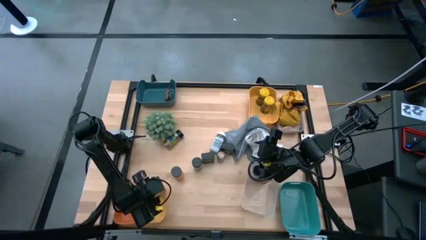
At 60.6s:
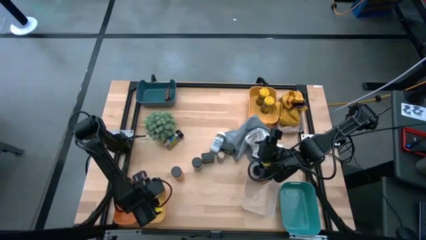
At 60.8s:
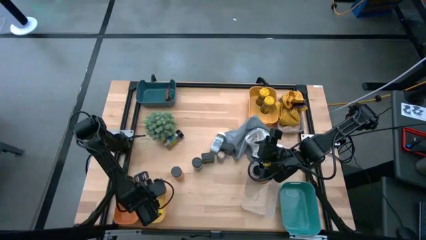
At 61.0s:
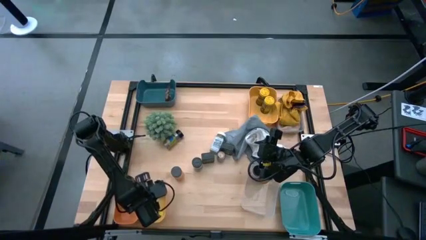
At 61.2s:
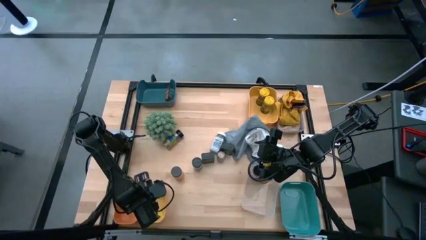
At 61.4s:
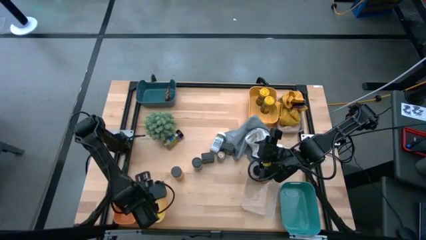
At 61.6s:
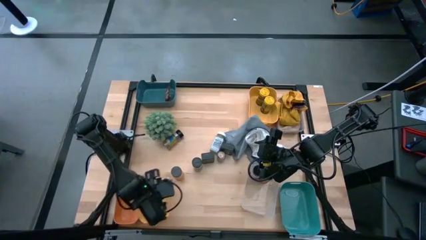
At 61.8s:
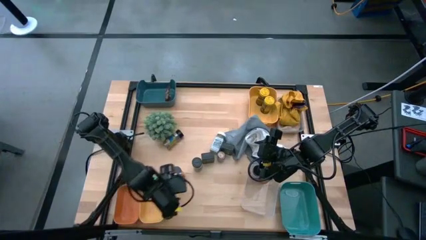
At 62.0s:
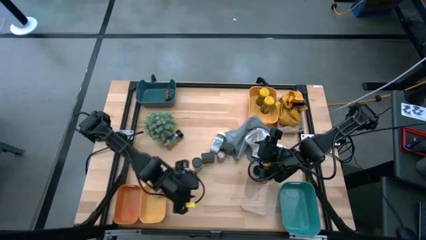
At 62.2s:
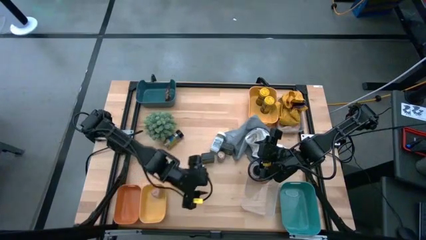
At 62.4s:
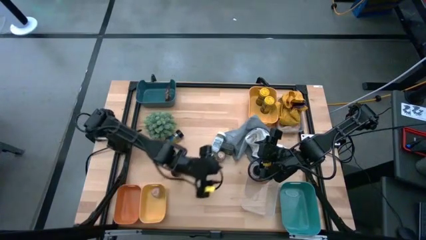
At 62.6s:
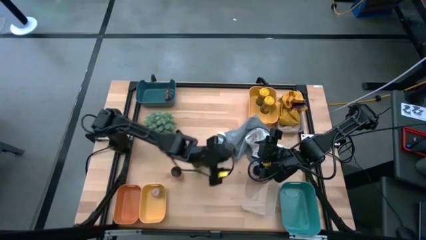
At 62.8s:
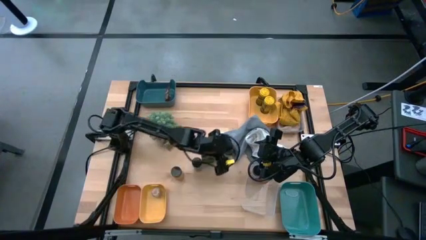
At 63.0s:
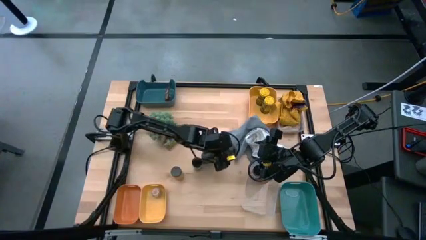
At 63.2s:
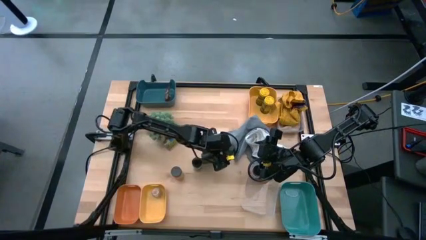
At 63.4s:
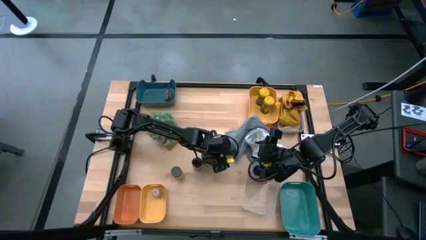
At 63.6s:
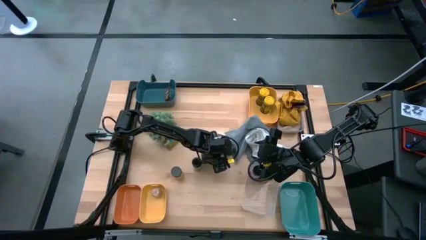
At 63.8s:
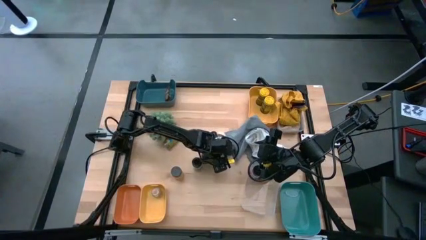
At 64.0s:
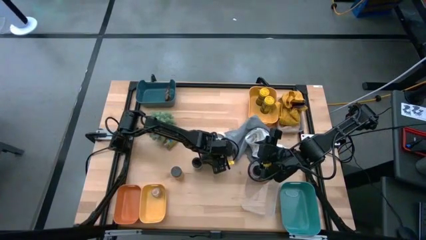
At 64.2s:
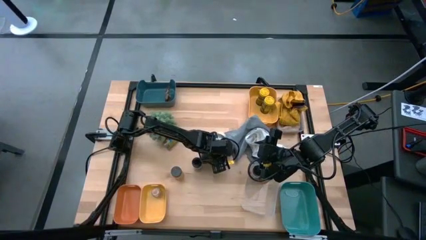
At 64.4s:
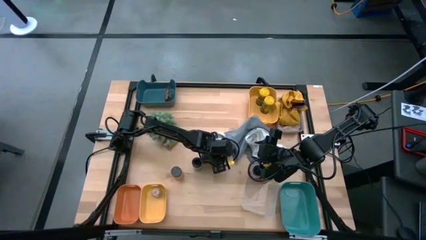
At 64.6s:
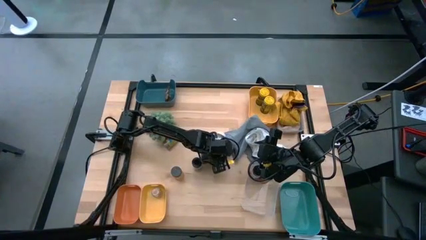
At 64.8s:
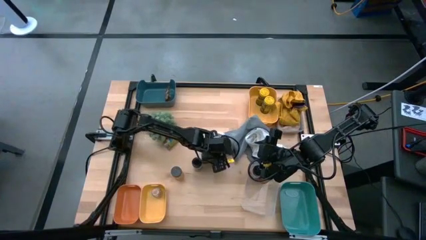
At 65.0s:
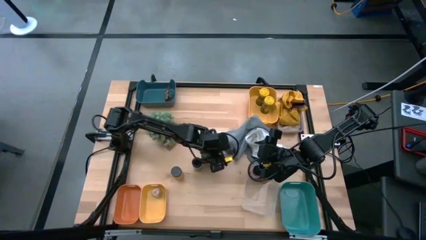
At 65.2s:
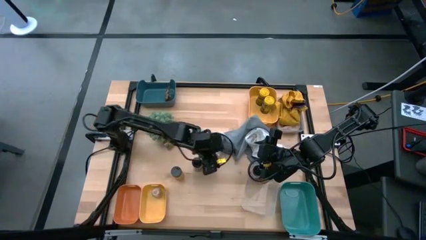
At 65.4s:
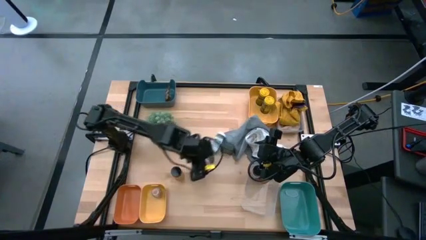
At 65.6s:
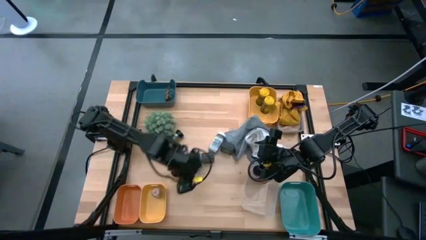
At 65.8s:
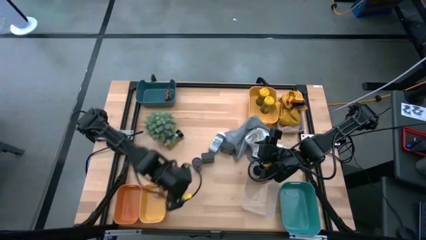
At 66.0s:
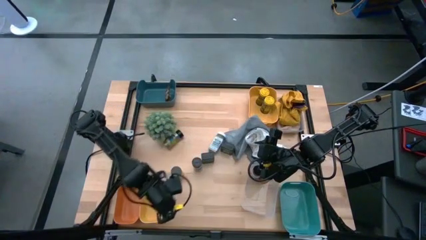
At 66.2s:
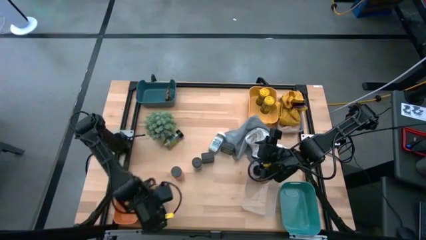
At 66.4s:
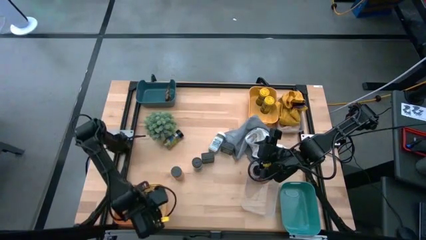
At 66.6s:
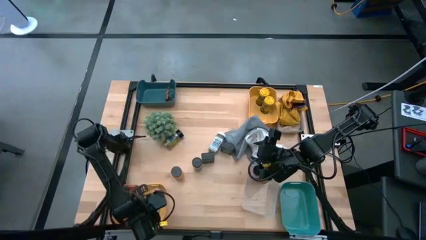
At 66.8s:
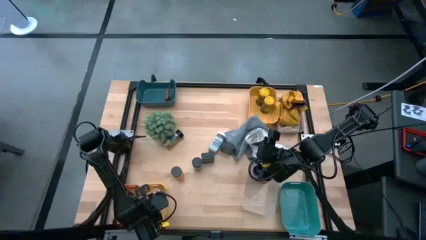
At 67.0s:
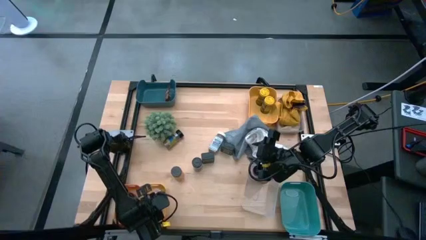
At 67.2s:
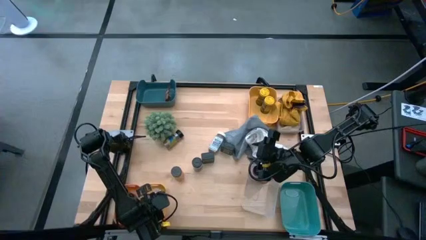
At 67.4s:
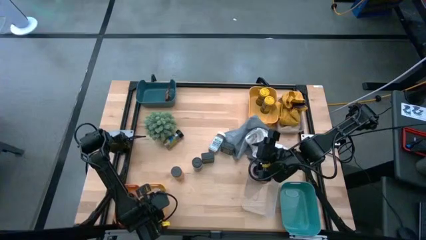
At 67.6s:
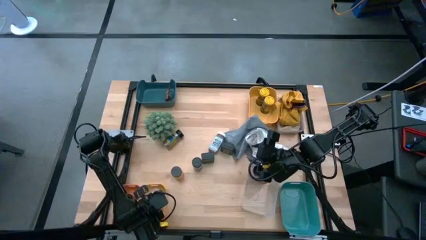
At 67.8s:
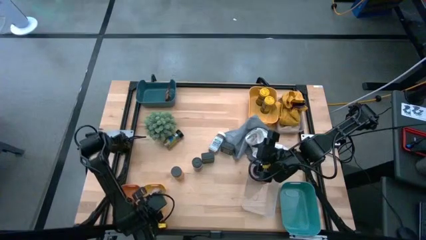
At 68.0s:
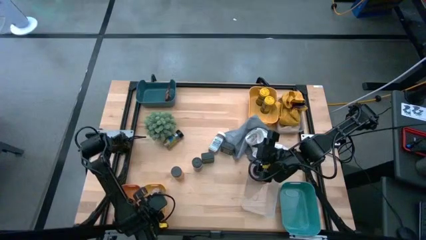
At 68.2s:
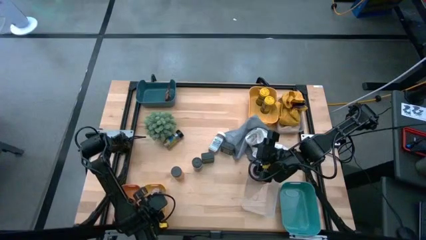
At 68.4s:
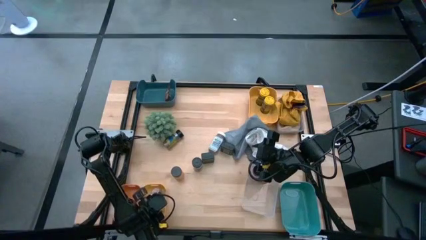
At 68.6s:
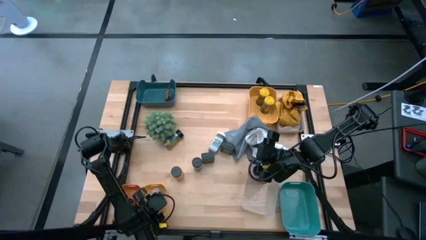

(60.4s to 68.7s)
Task: Sort spices by type
Put the transparent seasoning bottle into the bottom yellow bin

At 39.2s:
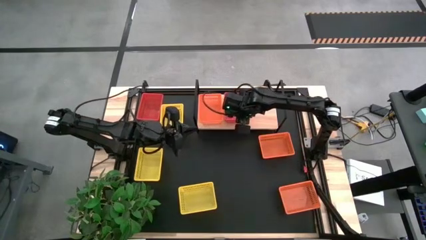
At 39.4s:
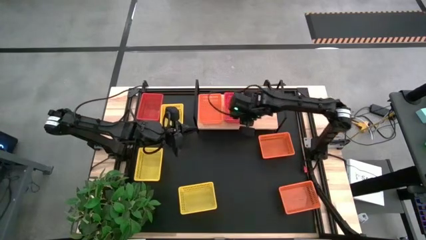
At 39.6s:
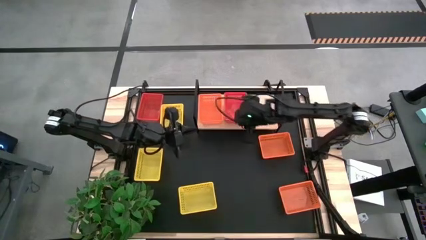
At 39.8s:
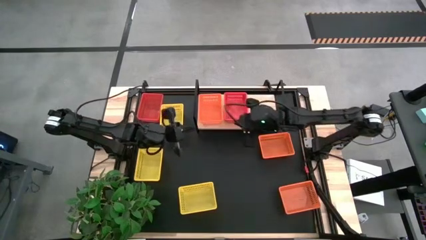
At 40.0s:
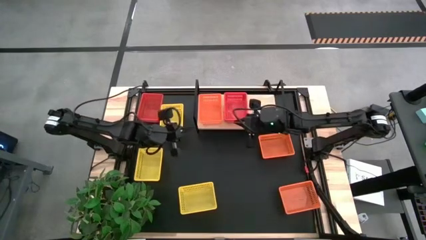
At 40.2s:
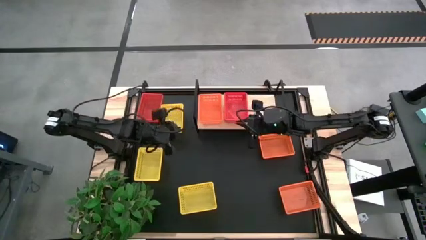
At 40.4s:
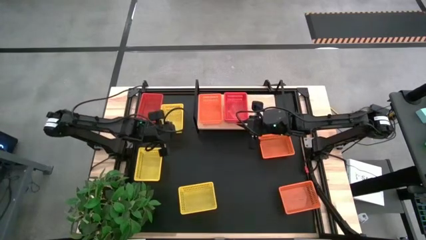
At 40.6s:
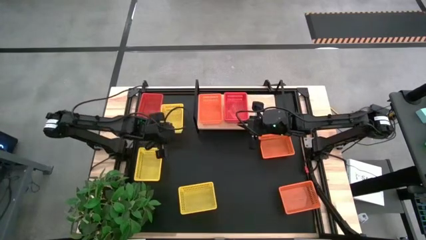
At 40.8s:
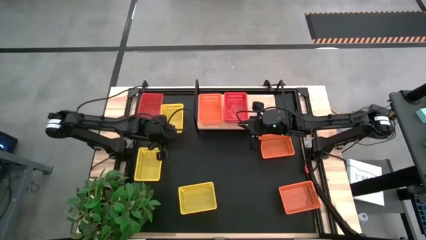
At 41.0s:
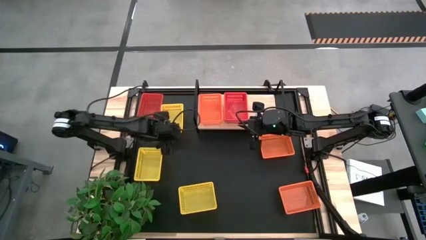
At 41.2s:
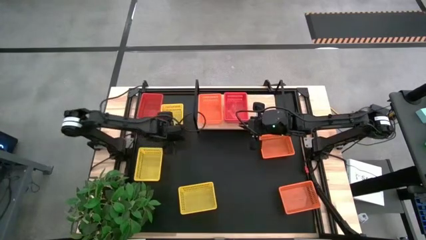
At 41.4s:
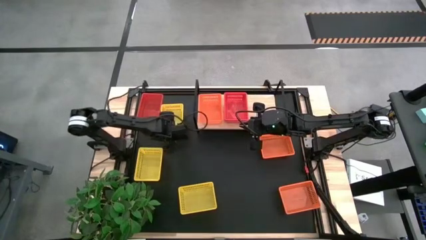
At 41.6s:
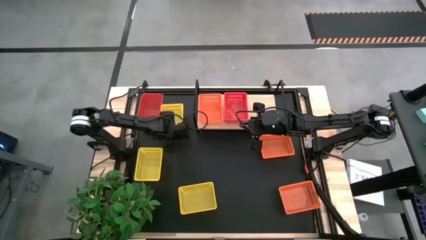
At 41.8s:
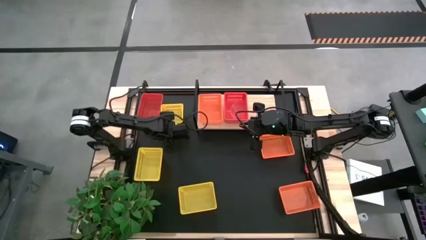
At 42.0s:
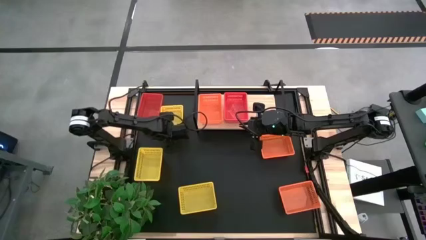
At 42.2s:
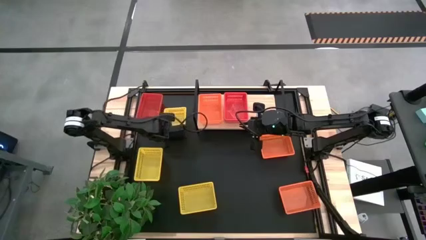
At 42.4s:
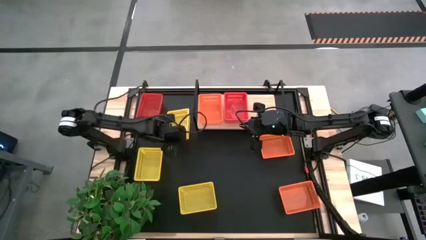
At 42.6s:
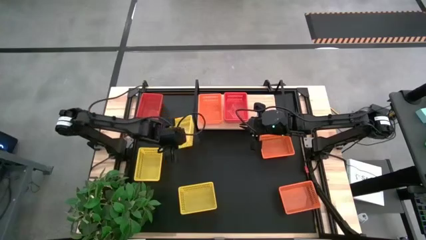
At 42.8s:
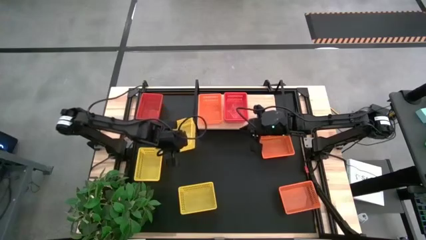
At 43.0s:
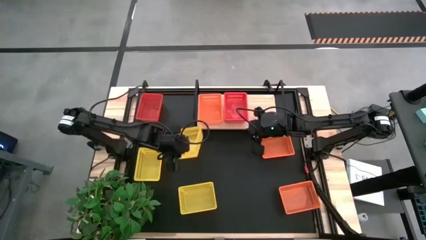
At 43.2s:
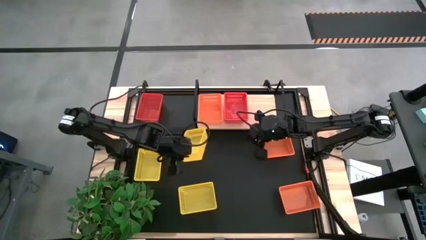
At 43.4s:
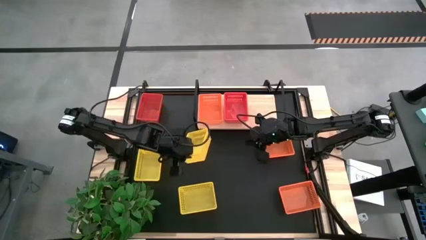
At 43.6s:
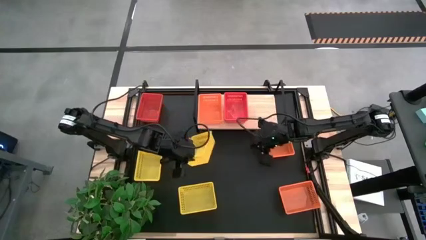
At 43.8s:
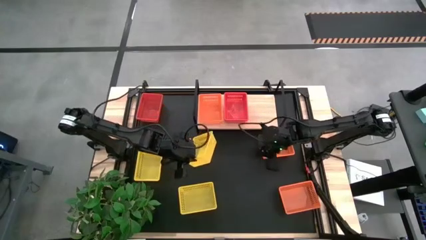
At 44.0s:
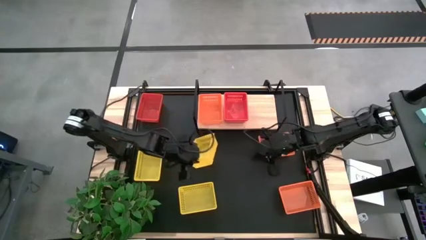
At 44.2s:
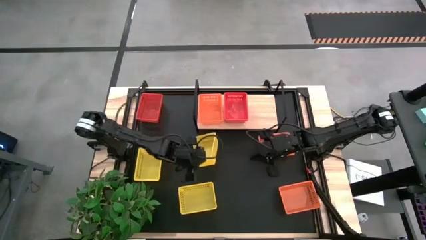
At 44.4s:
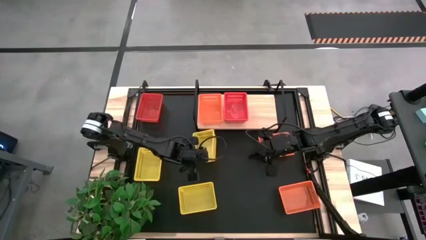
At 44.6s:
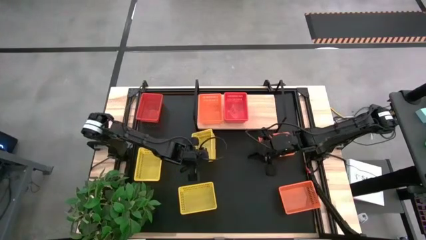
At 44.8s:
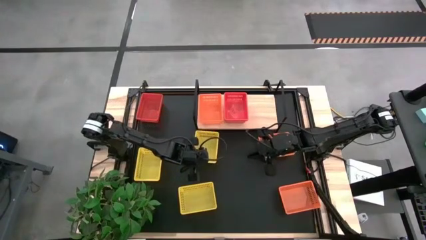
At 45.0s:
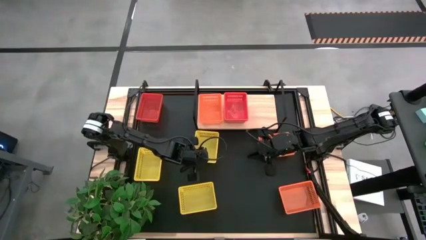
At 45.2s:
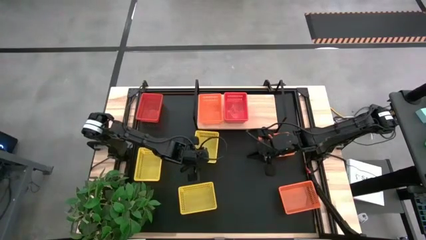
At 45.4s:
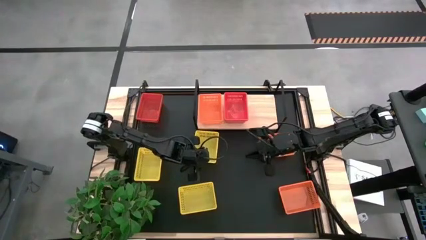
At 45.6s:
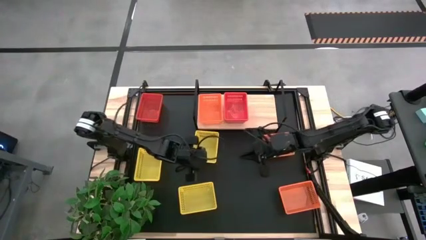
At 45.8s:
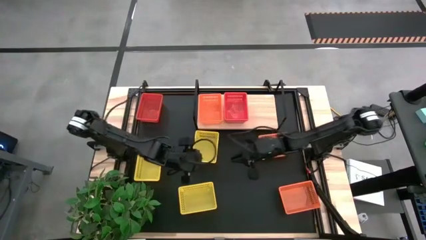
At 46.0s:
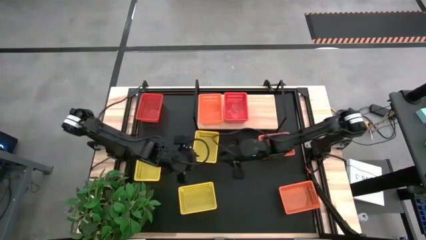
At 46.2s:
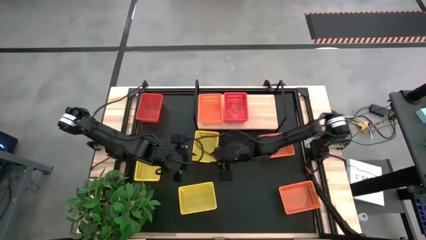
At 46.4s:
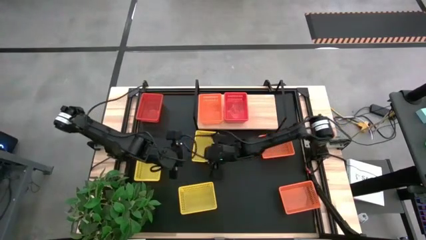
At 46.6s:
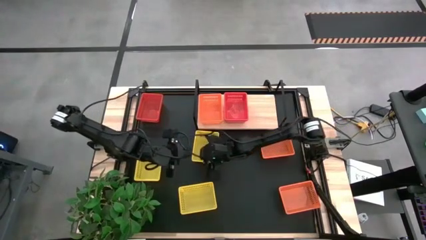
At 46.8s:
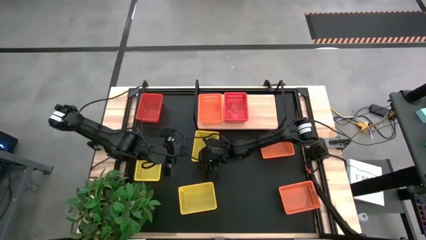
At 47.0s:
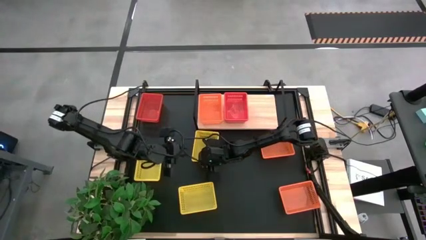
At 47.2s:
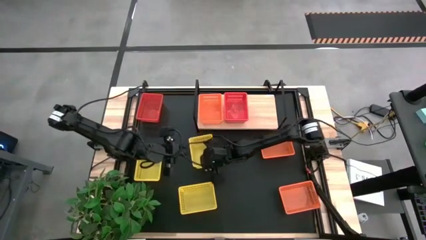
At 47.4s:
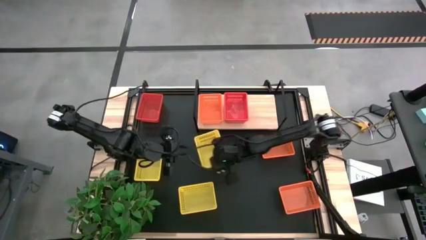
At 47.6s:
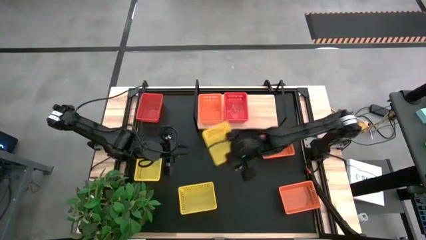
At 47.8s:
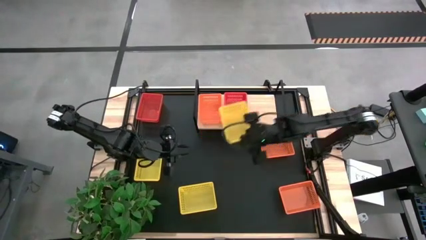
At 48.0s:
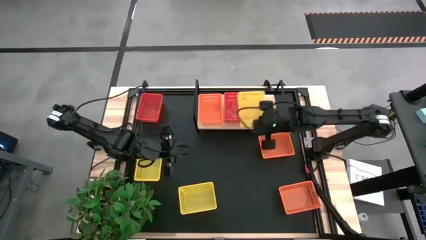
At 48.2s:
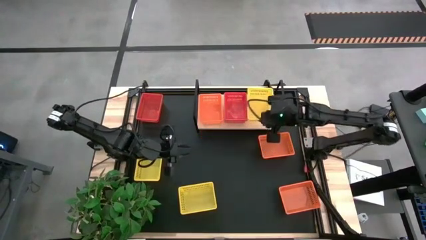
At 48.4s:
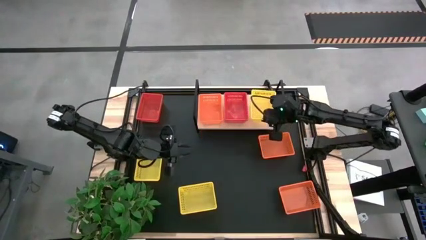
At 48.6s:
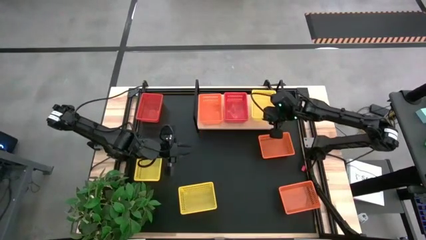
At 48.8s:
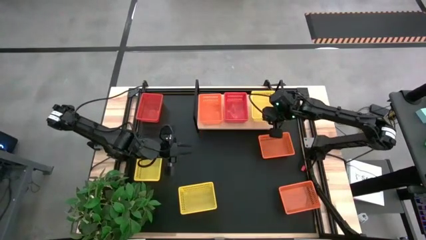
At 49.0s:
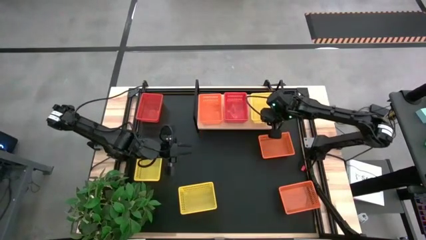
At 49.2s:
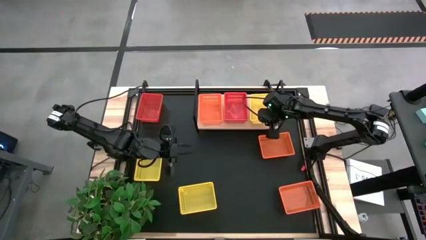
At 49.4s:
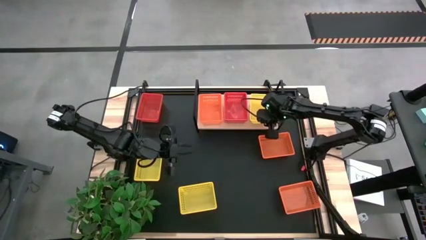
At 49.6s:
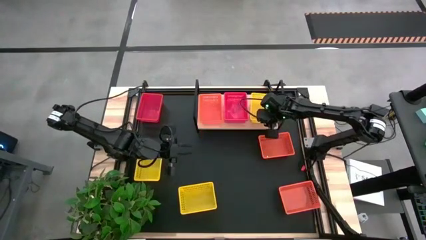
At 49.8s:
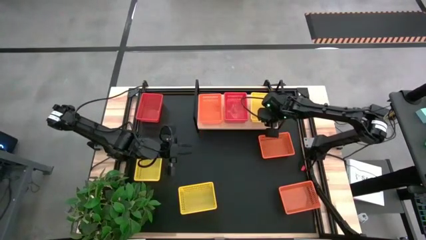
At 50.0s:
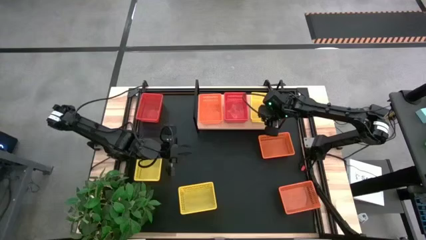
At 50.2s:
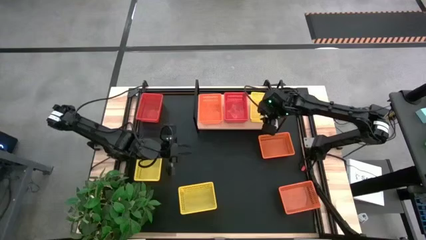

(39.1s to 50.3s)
Task: Stack baskets on shelf by color
Put the top yellow basket on the shelf
